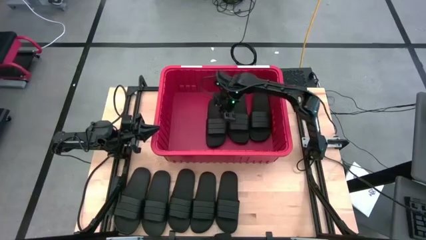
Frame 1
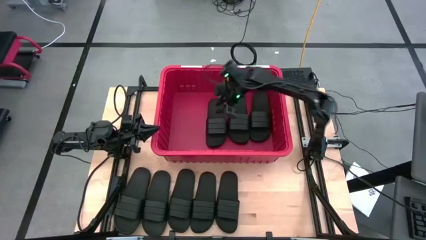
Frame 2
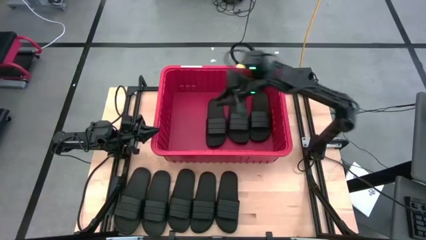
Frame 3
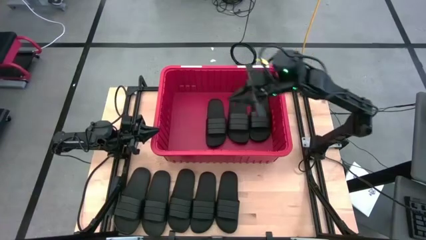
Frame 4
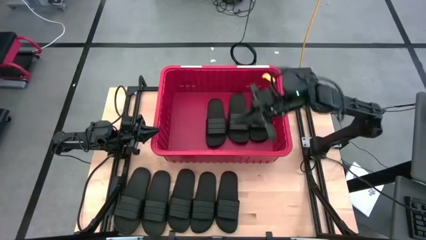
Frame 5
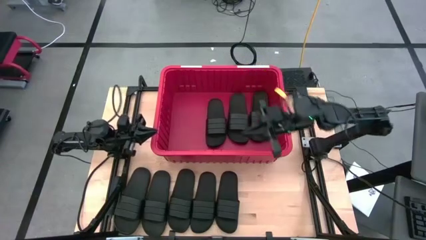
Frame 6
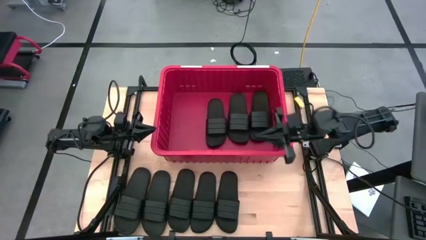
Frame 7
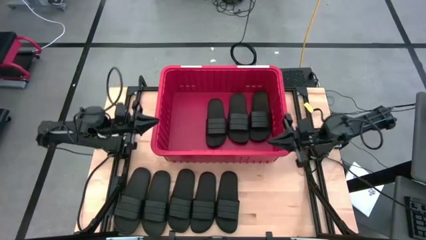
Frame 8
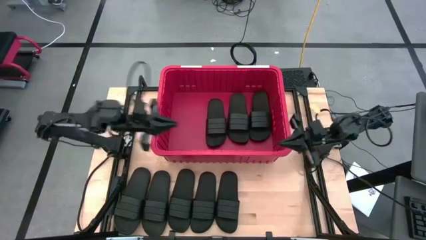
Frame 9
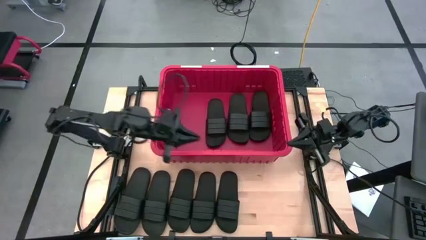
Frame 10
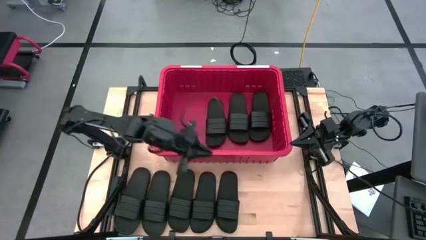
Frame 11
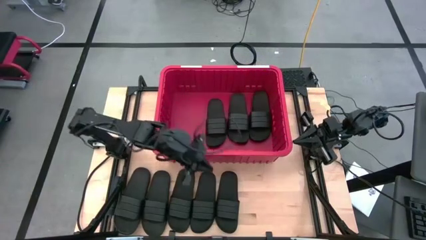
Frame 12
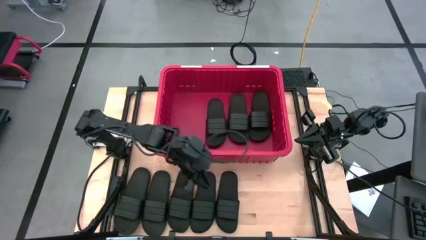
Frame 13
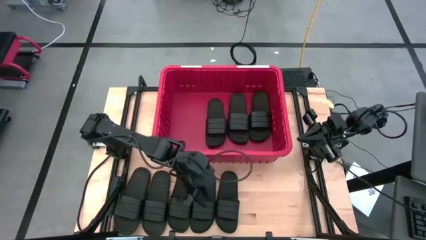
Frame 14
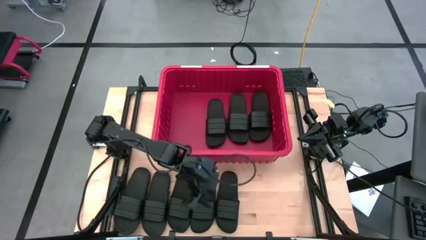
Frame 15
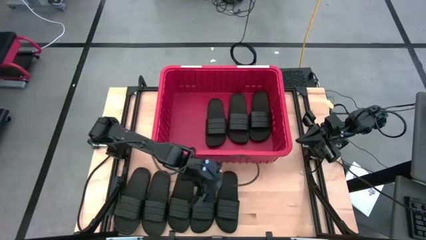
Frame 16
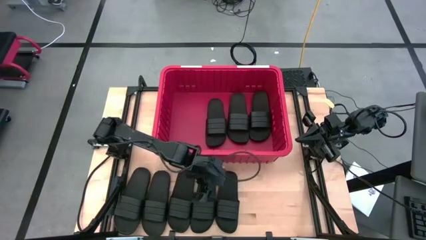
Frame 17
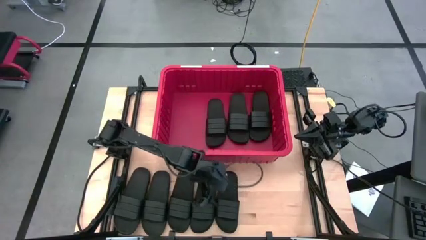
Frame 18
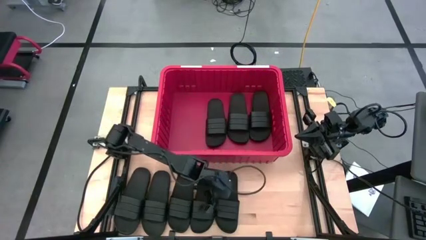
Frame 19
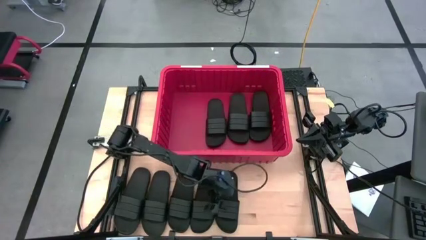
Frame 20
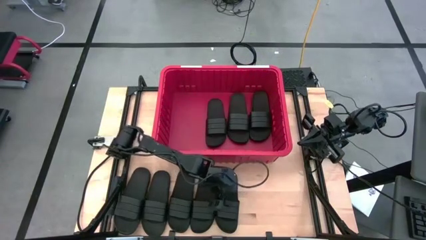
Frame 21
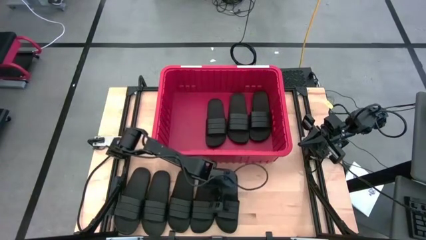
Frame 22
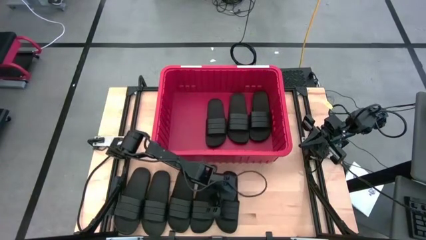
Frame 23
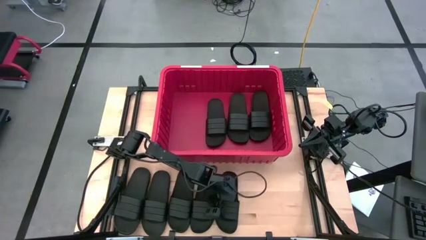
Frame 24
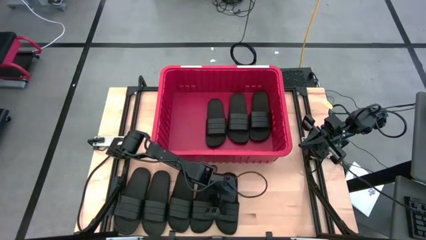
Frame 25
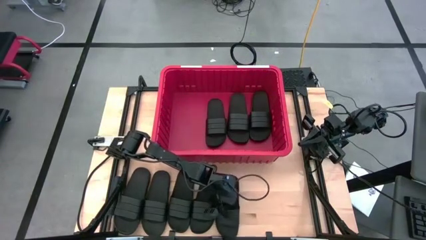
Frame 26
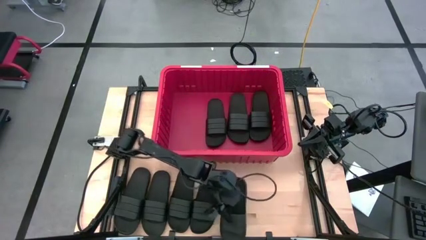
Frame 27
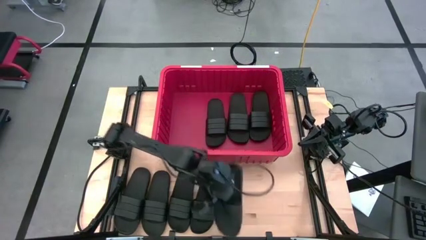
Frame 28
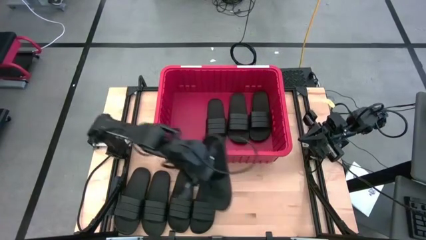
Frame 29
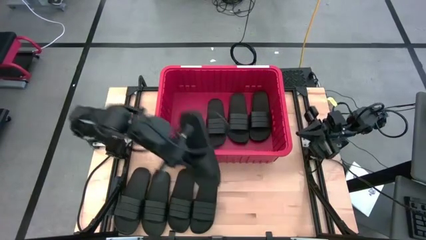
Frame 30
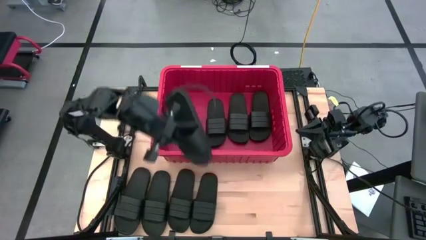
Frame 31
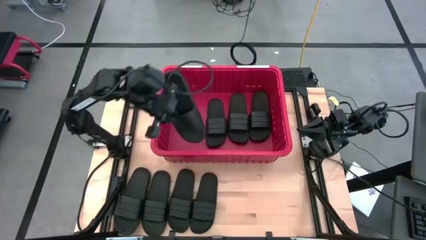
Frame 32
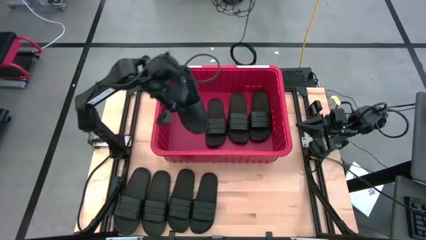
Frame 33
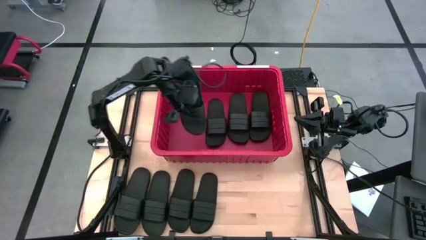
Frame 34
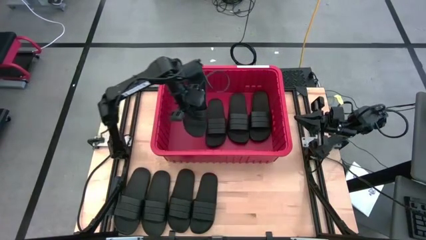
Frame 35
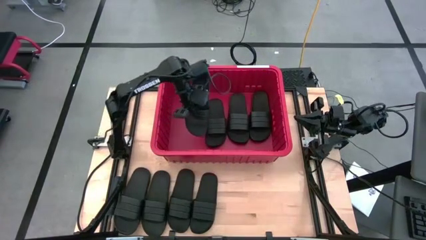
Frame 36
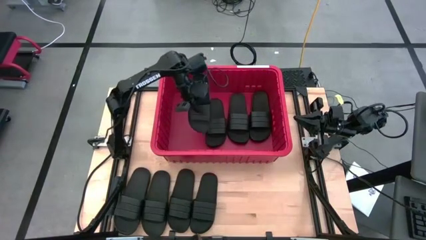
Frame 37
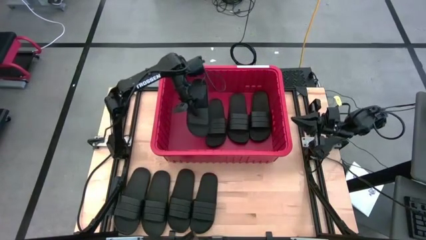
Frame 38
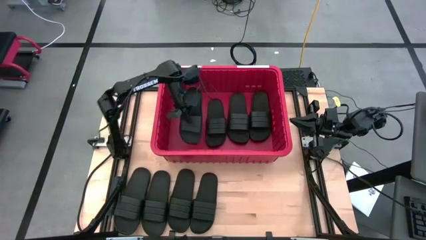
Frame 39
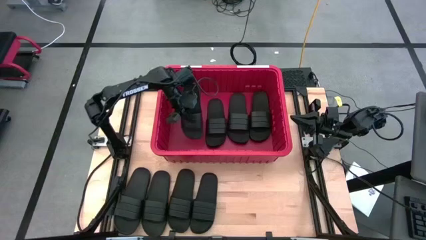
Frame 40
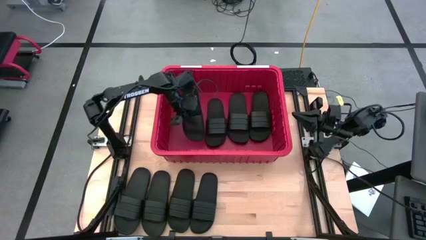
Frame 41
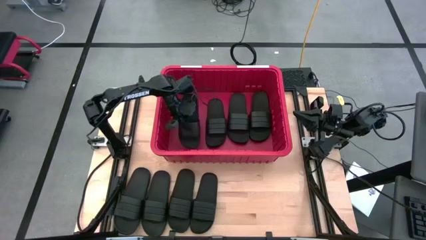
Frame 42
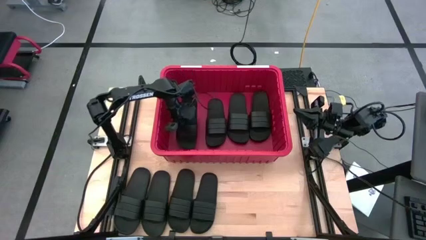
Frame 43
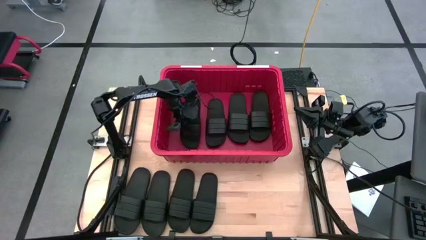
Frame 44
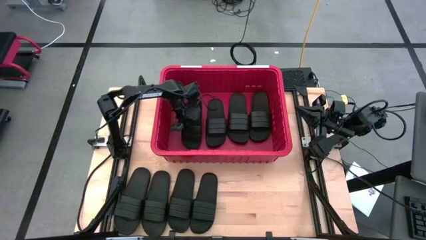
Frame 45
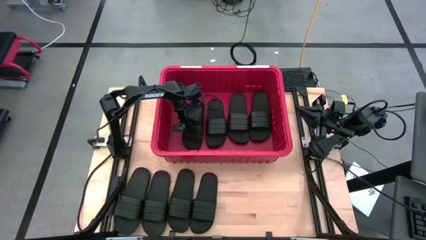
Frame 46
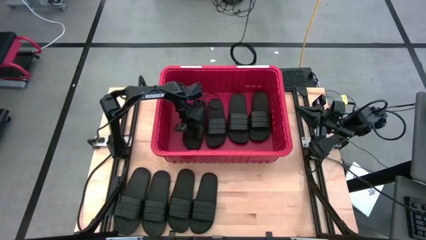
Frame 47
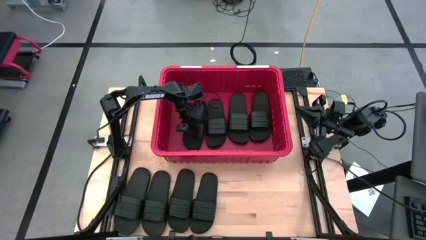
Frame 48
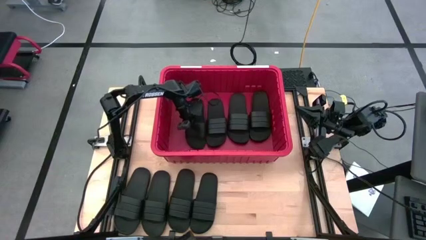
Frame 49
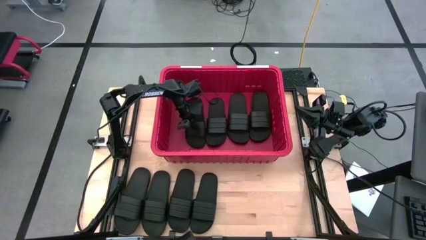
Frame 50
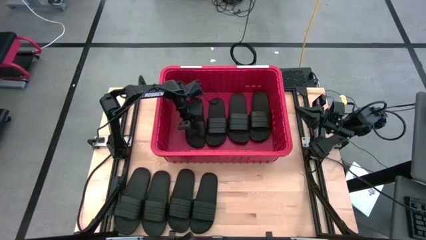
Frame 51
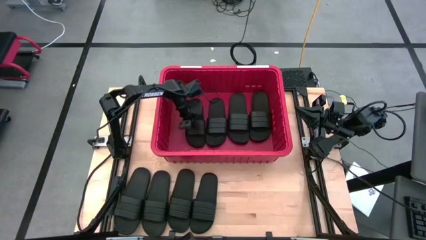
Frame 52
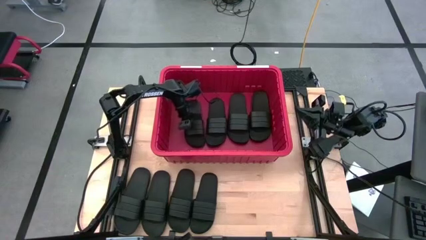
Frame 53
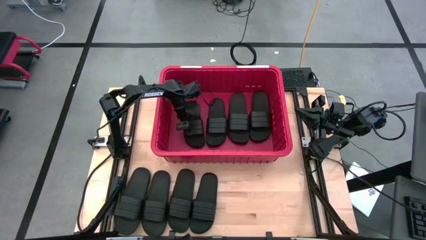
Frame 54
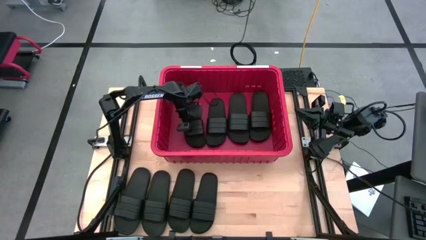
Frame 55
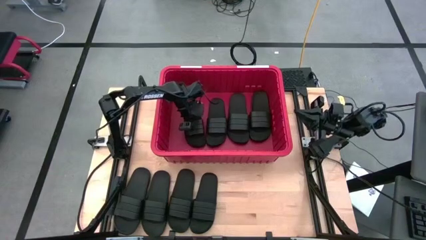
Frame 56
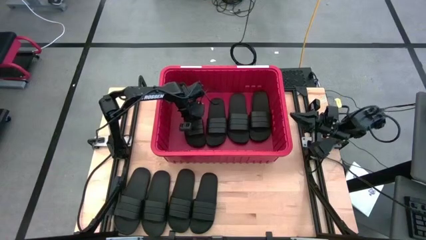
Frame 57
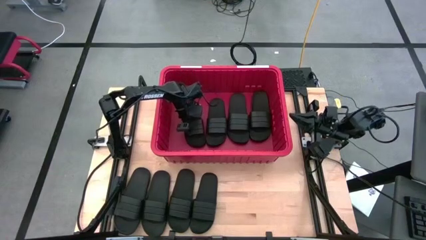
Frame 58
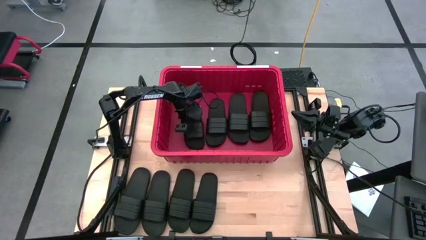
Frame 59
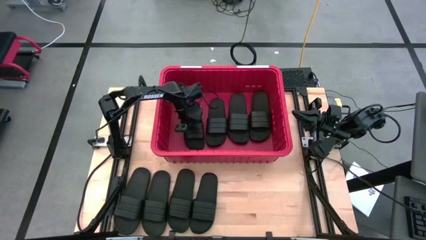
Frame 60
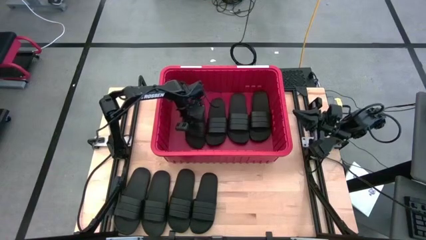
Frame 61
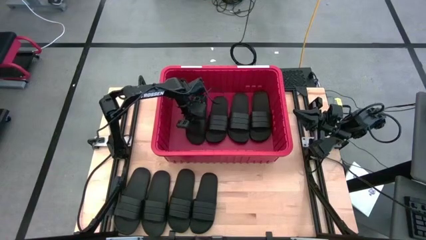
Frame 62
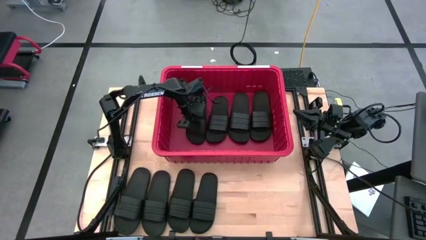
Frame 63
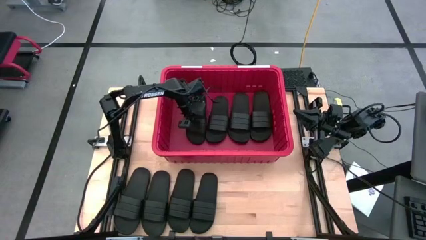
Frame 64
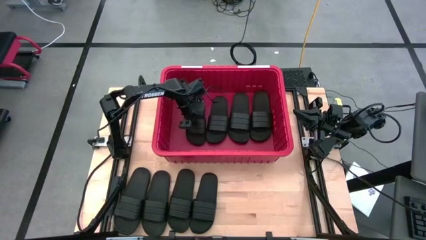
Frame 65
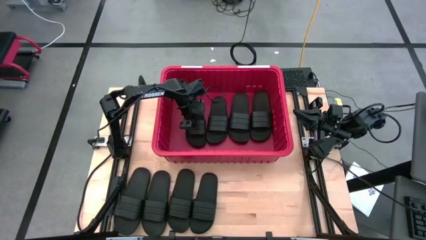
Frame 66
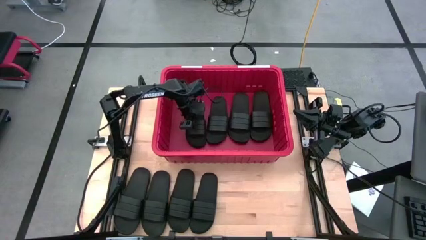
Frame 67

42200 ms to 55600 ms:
Task: Pick and place slides into bin
Put the black slipper into the bin
